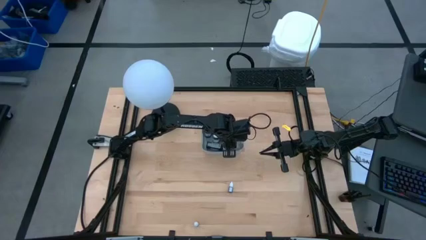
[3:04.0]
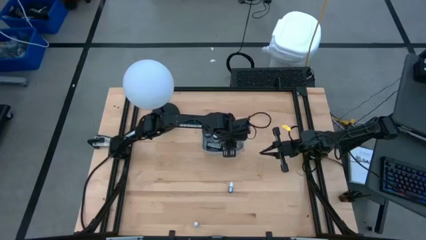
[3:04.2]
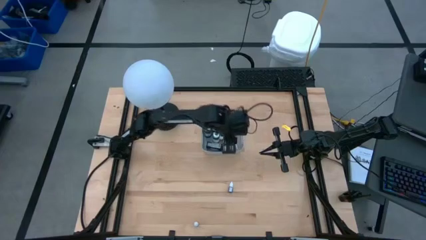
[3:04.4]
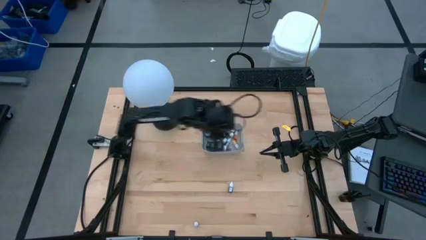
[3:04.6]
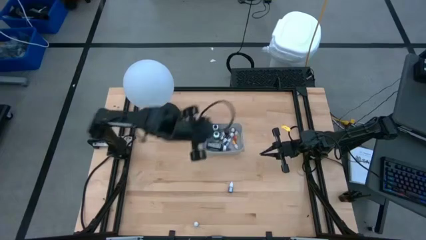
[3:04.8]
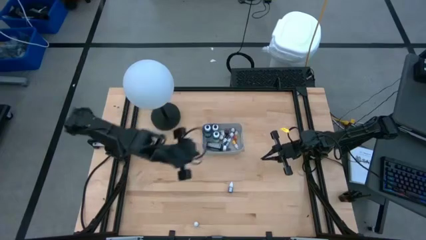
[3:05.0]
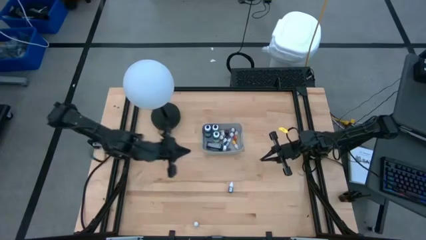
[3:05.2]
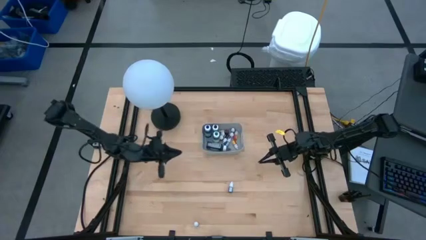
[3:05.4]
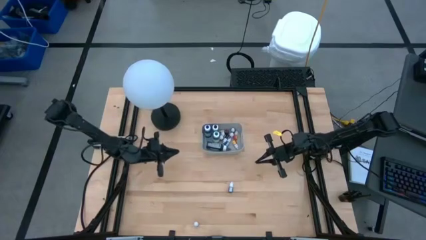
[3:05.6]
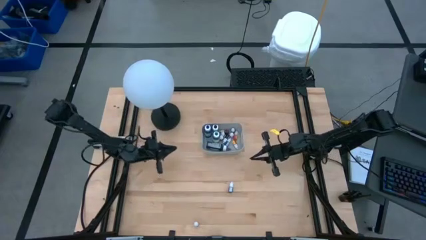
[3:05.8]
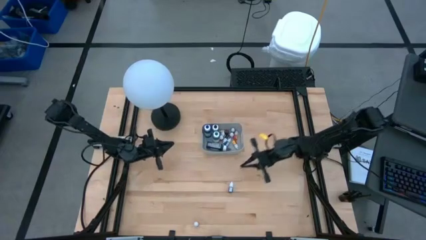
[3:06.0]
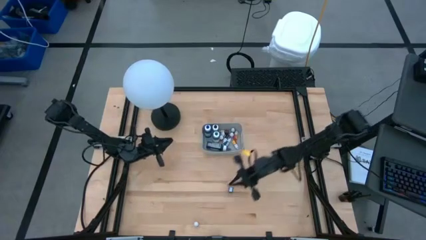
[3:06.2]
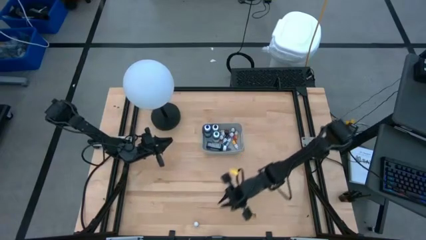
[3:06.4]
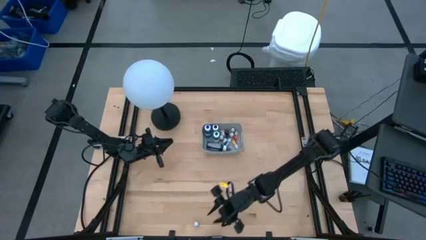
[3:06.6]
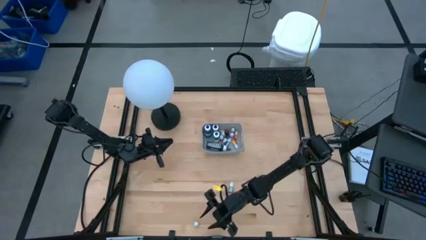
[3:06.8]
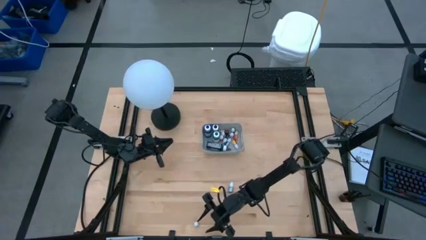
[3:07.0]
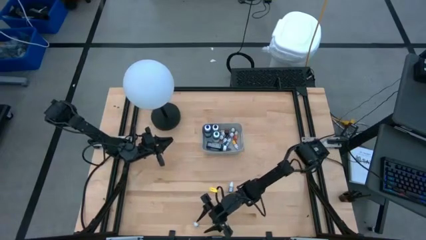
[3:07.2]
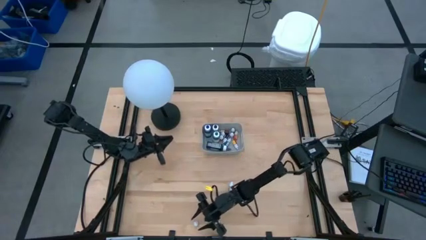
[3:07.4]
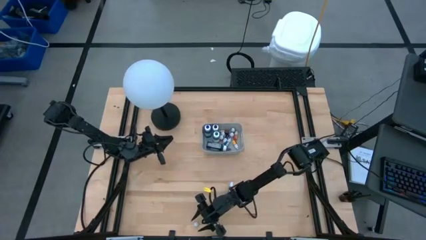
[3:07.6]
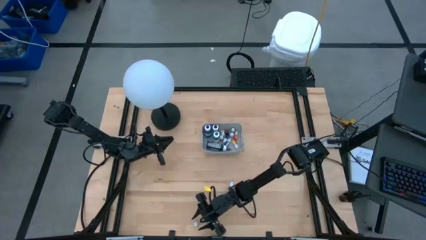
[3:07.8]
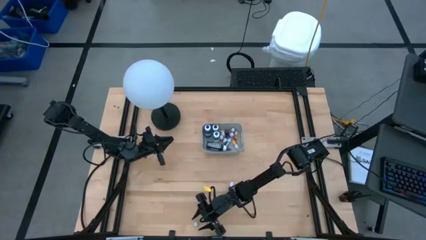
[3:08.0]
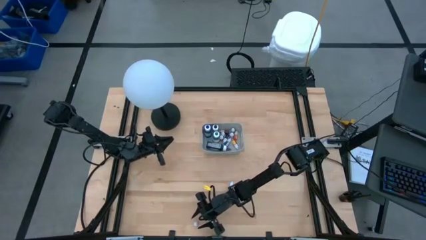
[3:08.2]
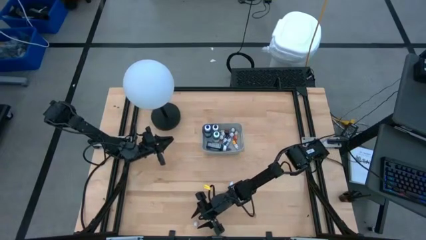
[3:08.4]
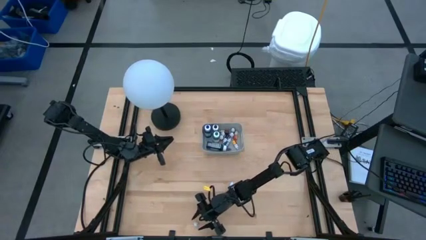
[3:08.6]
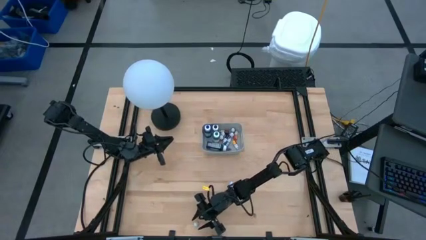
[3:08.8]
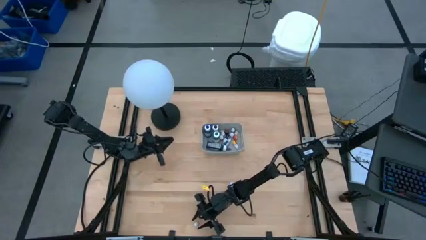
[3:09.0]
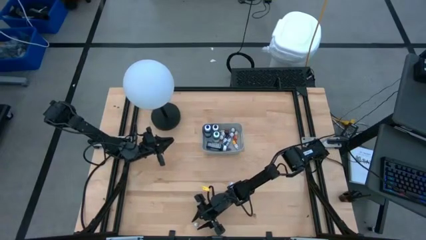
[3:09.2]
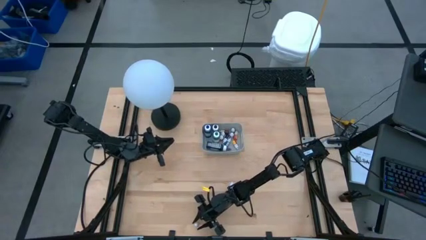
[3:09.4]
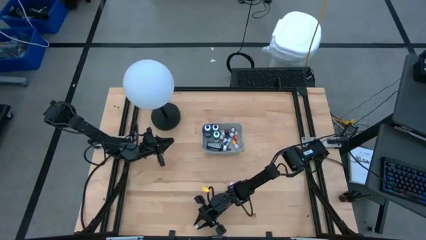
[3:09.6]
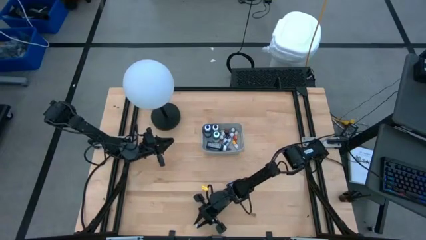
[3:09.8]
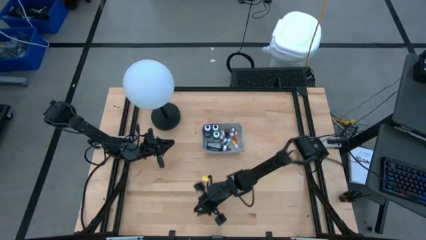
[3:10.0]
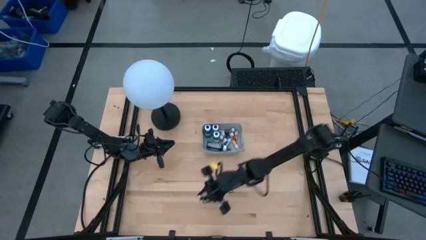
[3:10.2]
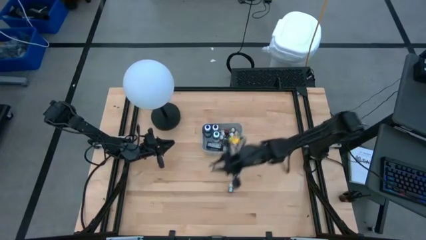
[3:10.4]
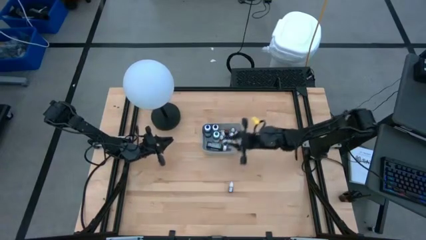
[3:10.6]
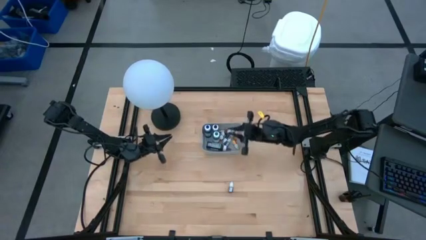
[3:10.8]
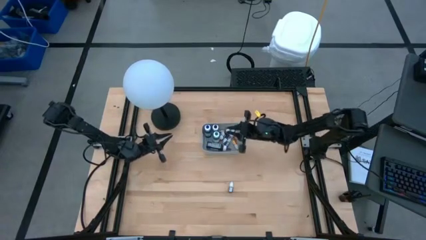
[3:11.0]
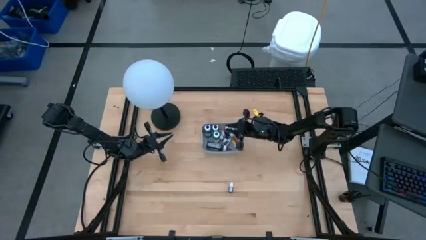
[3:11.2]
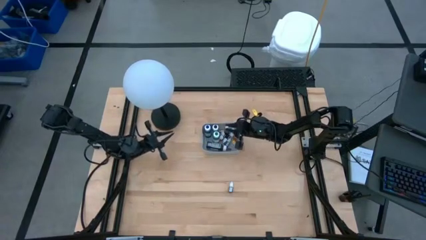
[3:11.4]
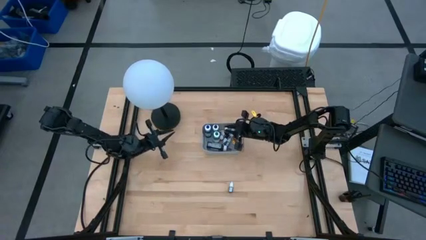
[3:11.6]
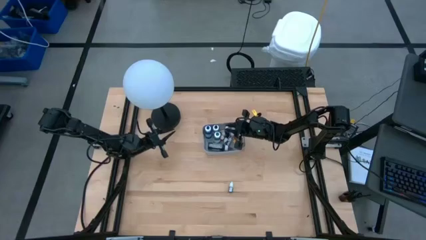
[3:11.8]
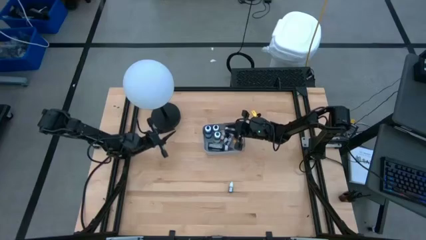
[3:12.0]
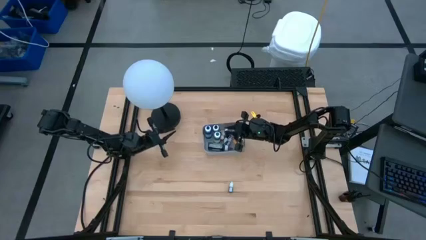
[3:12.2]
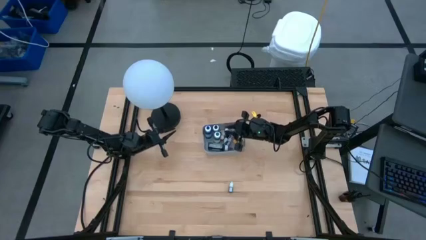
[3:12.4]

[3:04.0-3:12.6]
Task: Pick & Place food coloring
Put the small green food coloring bottle into the gray bin

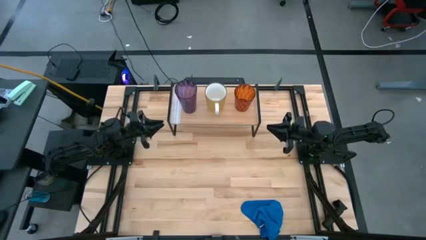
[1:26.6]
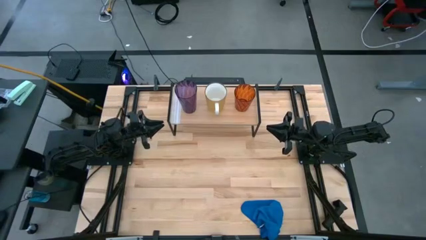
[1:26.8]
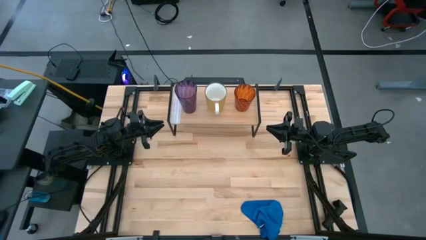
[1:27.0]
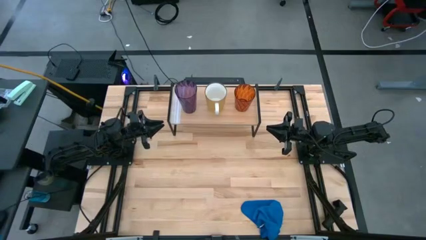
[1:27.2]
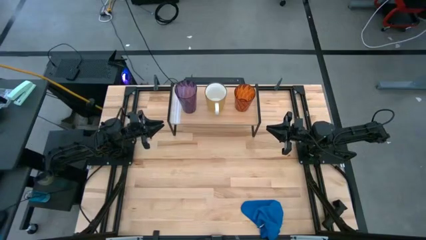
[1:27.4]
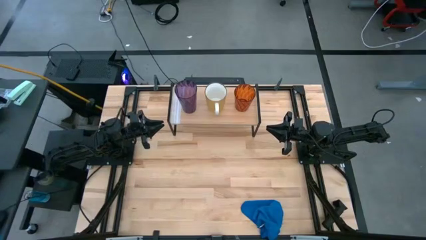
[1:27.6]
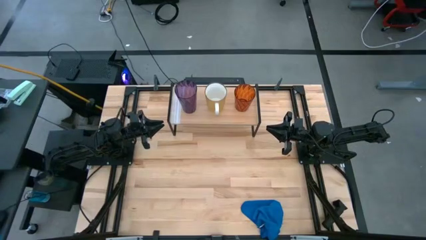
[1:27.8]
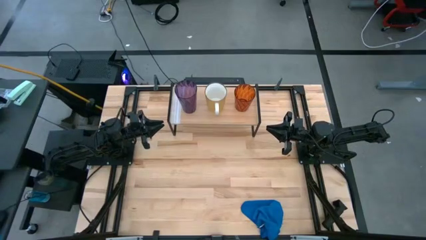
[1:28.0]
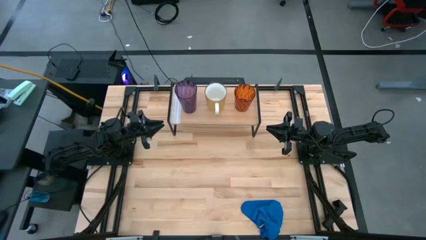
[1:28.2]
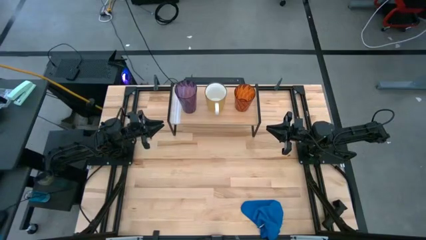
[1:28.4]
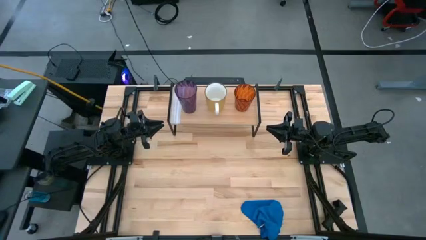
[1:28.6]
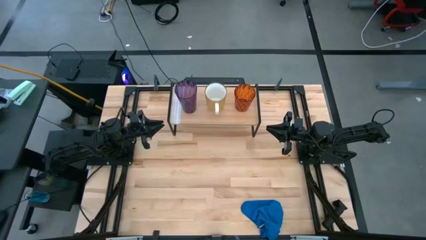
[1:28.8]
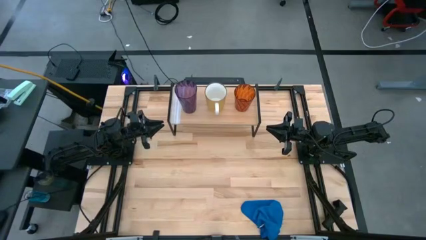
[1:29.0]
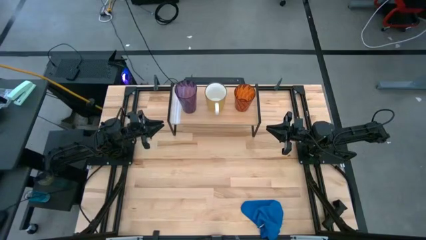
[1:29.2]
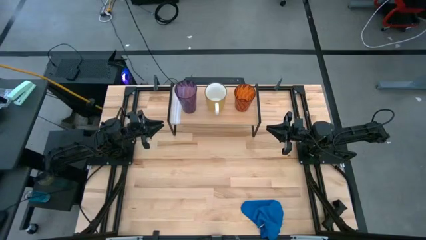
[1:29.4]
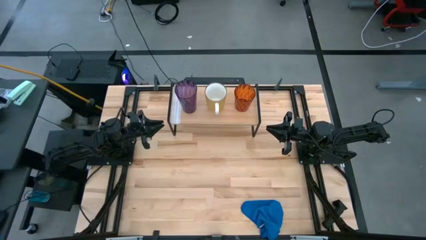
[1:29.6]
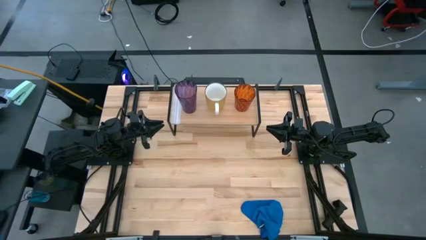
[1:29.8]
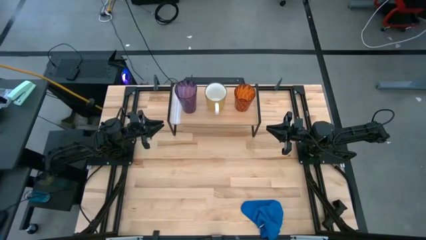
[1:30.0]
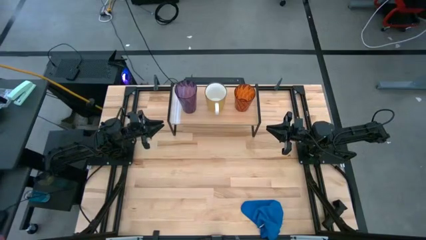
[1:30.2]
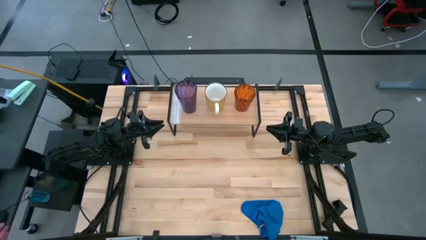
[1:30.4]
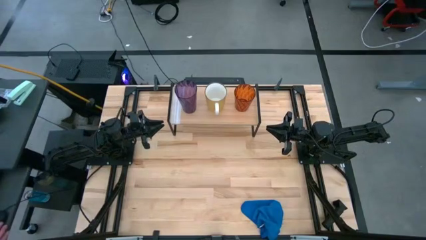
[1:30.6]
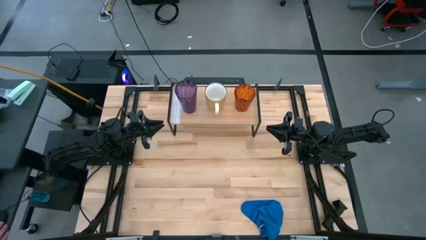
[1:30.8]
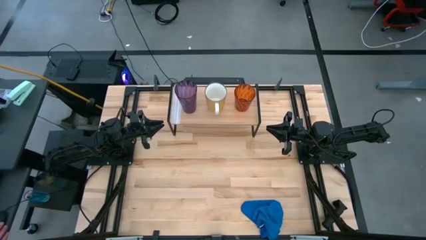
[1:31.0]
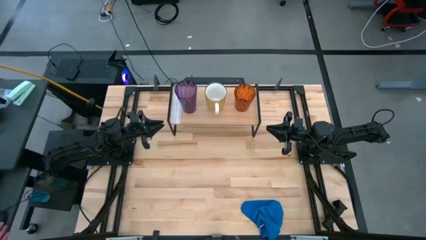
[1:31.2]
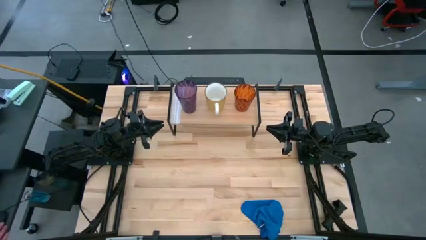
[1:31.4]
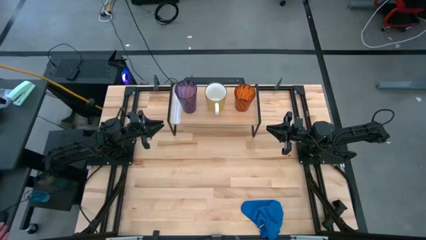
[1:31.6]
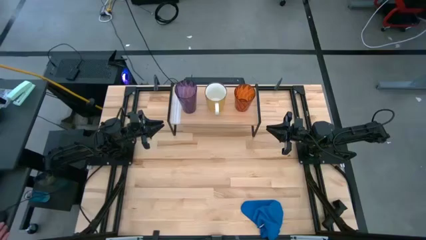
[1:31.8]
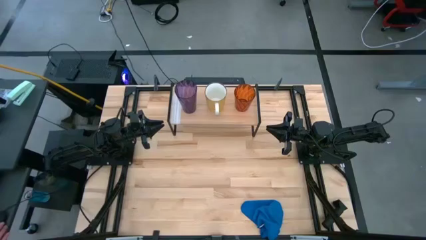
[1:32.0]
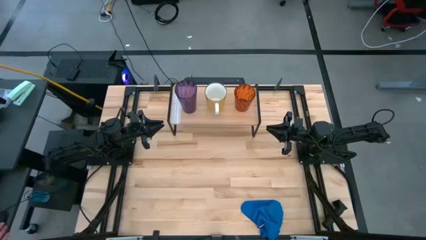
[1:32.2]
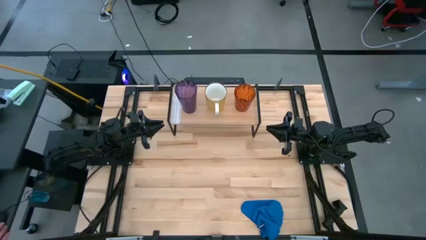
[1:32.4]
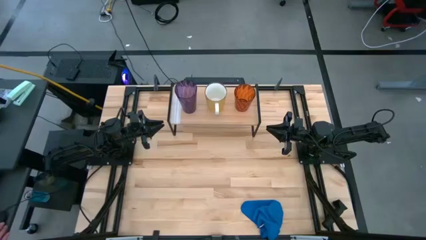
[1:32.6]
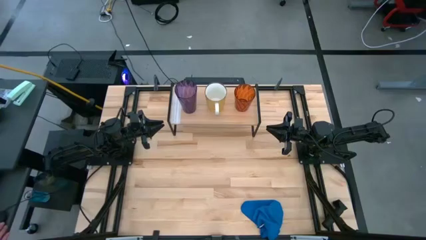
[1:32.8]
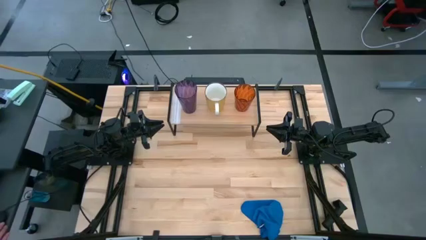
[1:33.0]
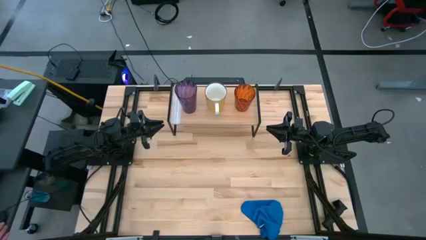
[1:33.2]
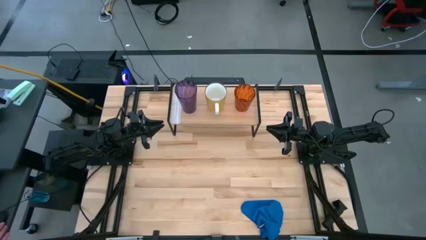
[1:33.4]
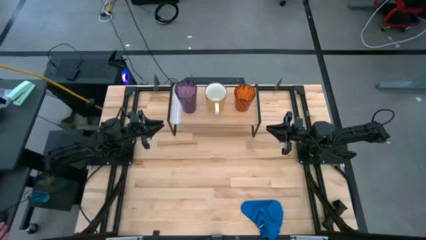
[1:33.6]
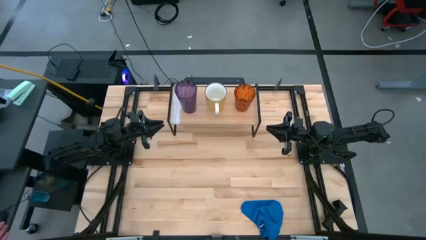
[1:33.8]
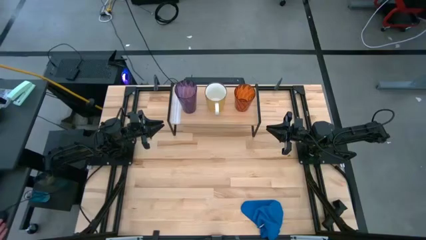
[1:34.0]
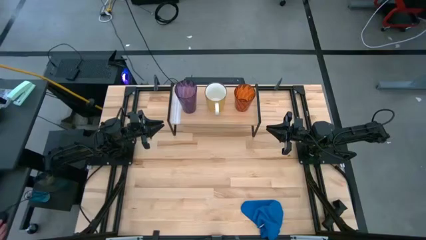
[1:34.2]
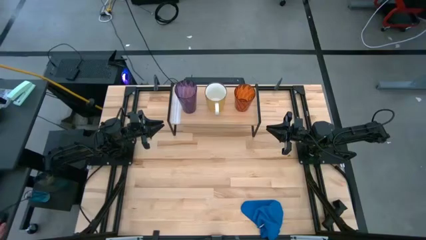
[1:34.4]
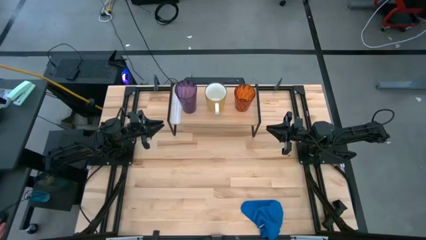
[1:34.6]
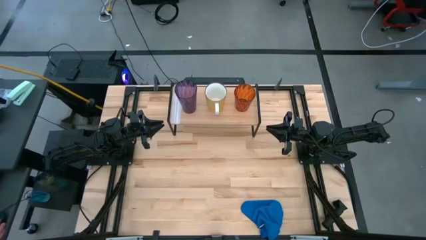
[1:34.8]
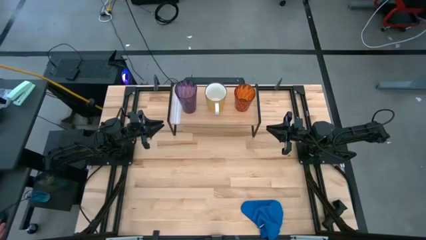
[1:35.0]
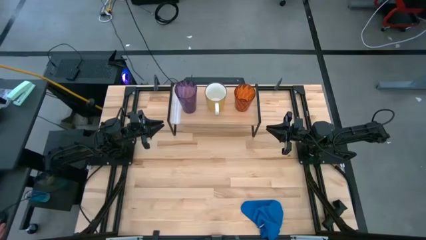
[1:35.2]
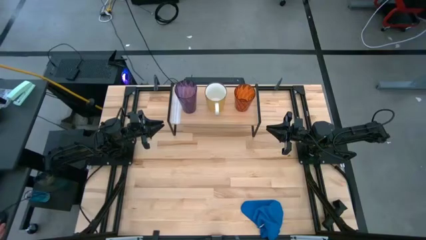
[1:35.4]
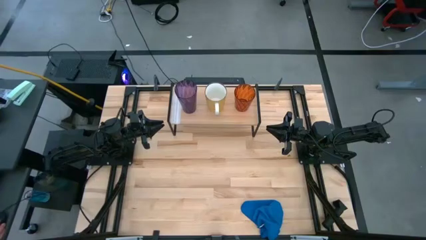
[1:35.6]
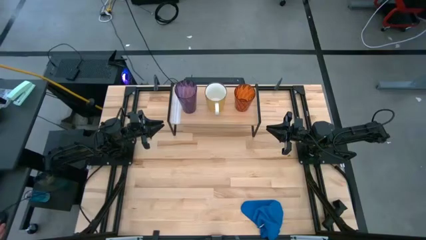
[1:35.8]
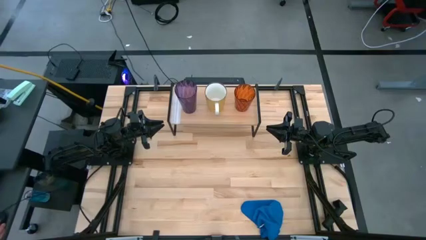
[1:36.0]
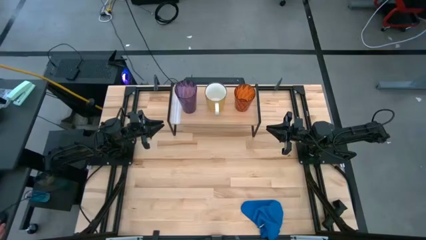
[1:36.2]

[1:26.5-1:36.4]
Task: Stack small to large cups/mugs on shelf
Return to Home Position
